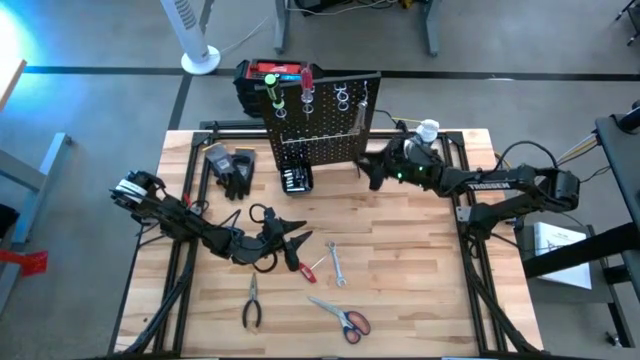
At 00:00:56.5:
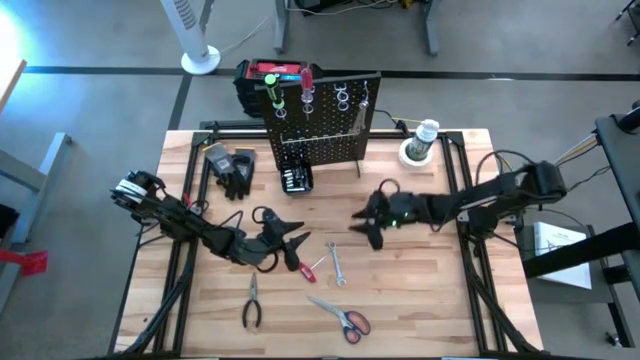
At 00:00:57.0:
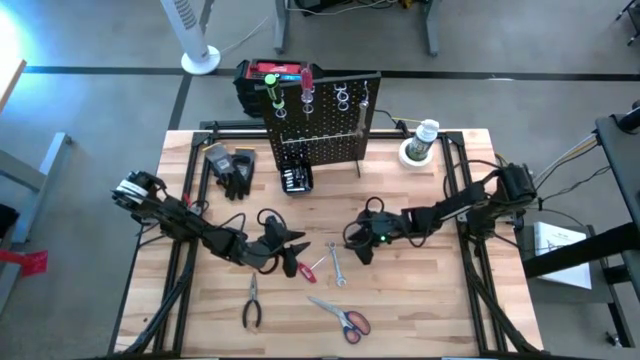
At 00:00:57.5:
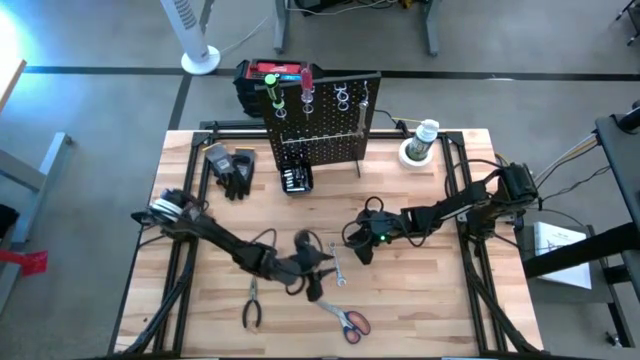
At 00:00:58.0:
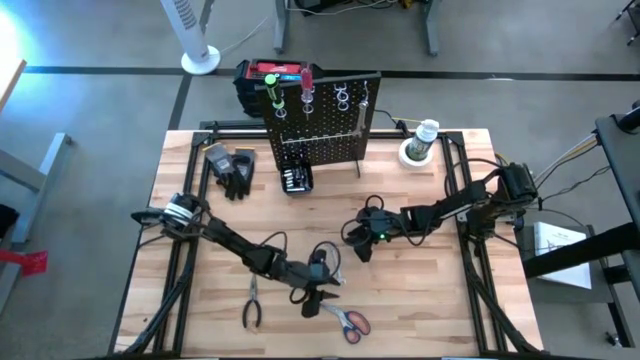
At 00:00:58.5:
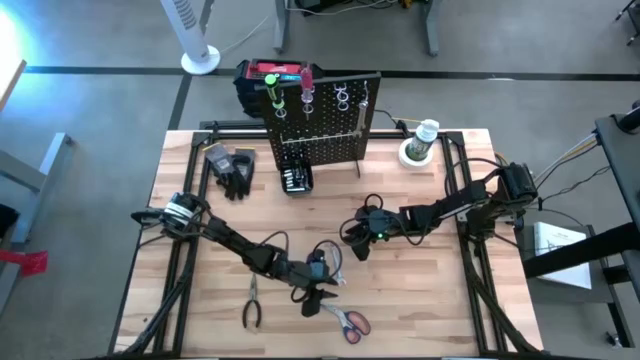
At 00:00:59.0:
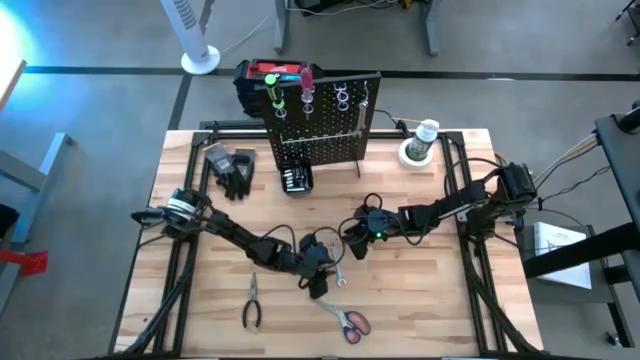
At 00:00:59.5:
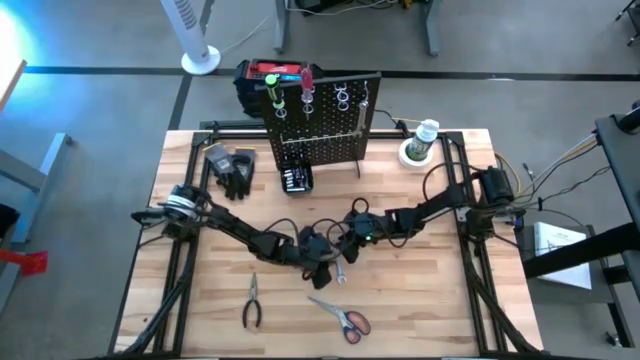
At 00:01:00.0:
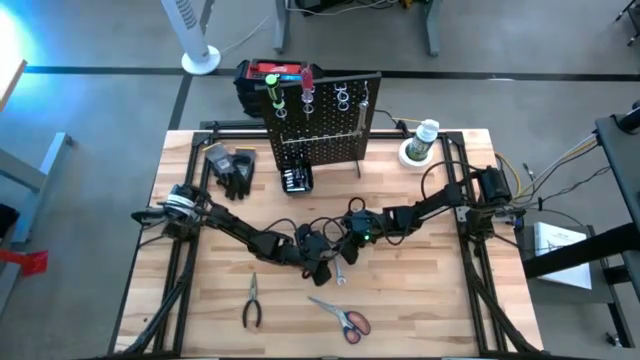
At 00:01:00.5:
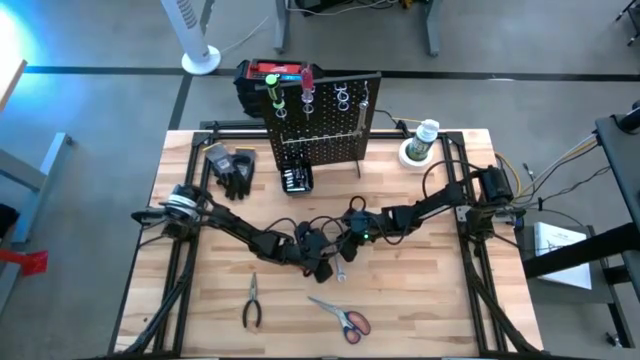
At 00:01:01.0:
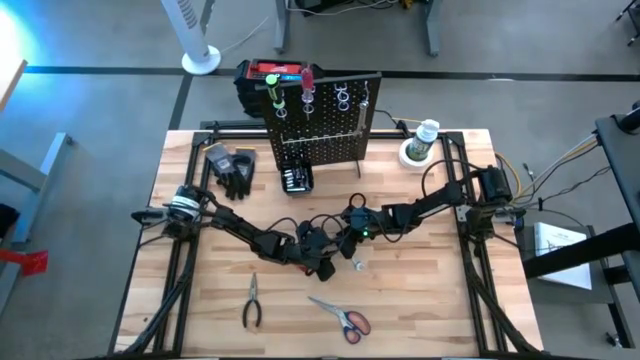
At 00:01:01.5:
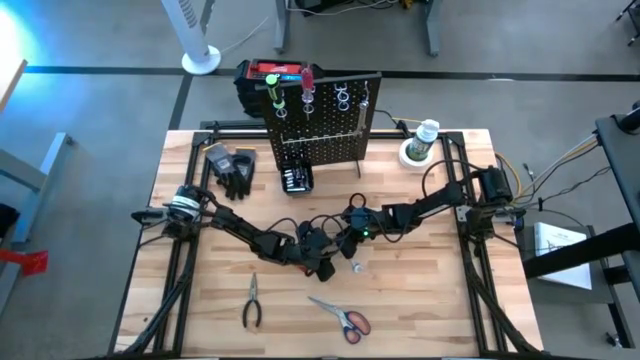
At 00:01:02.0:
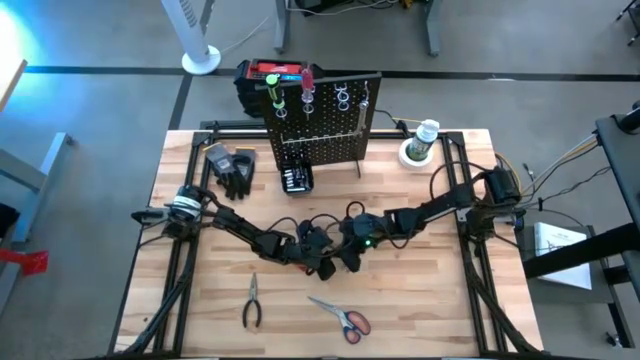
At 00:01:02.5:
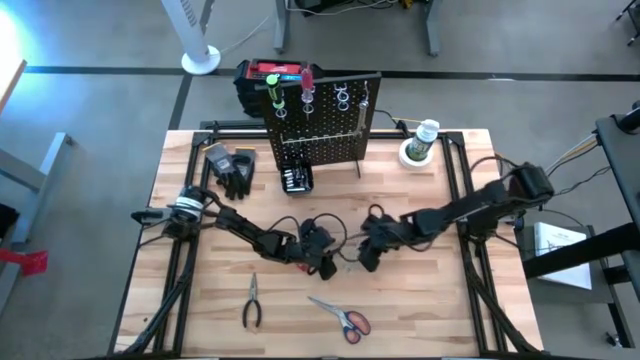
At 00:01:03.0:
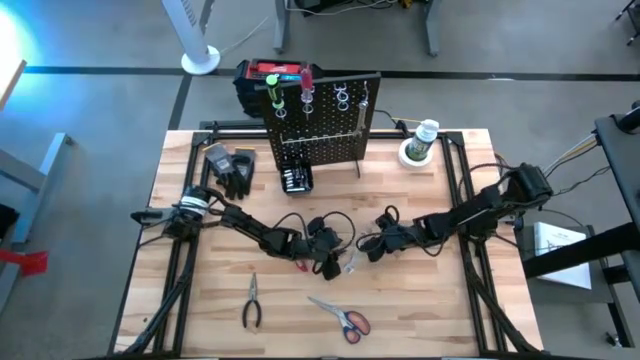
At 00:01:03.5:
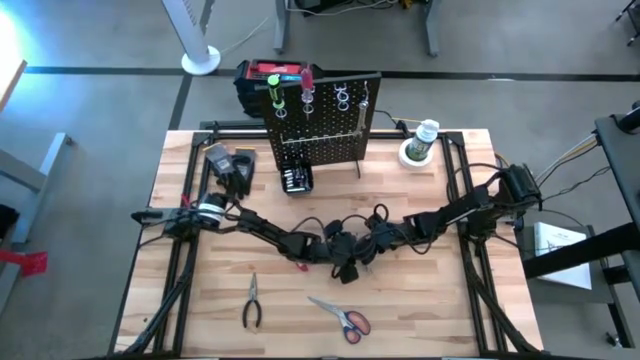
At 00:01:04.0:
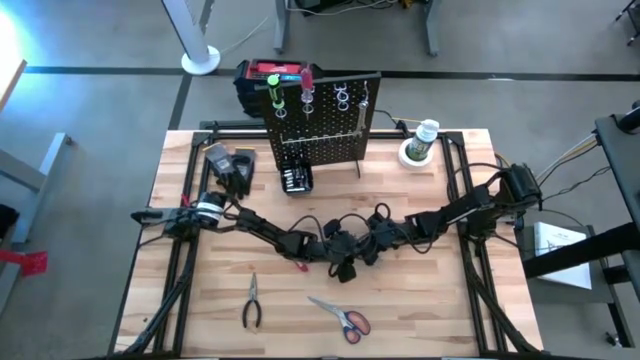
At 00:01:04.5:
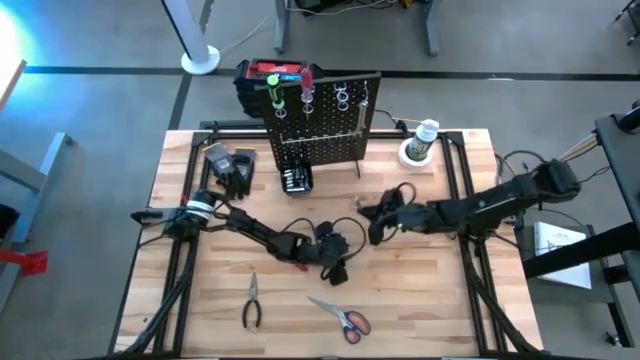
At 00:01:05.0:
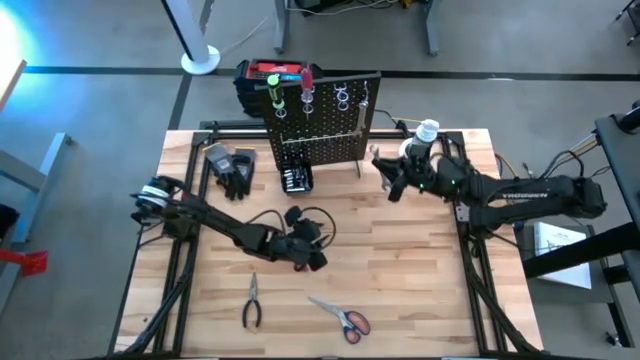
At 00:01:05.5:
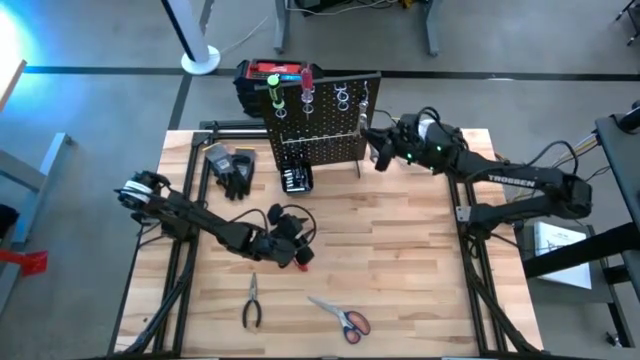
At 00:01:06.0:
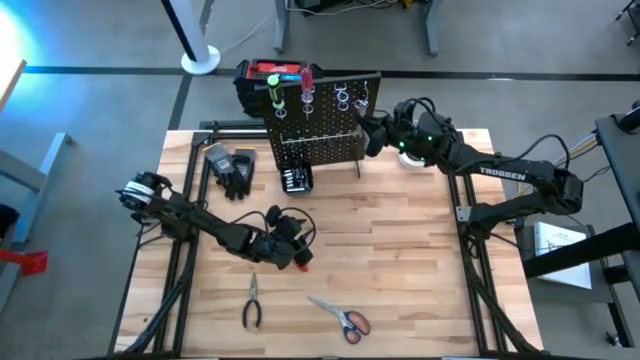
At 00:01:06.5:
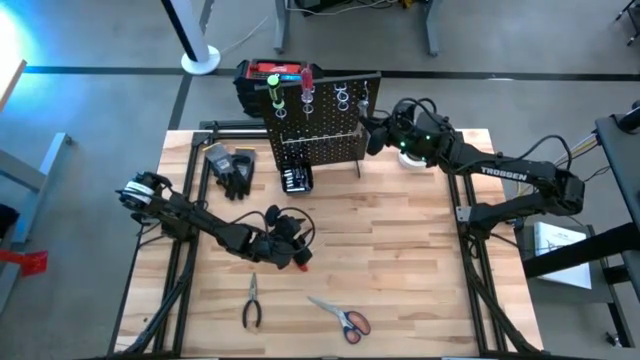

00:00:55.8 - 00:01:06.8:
Task: Hang tools onto peg board
Hang the combination wrench on the pegboard

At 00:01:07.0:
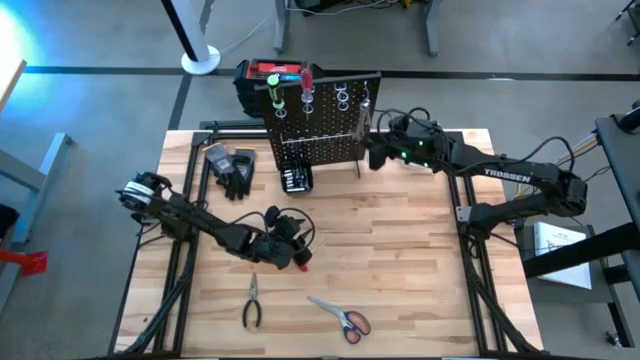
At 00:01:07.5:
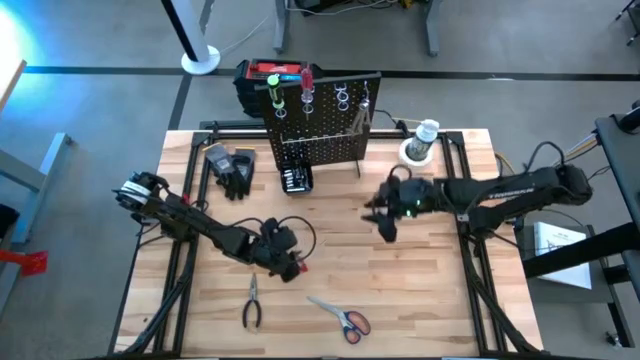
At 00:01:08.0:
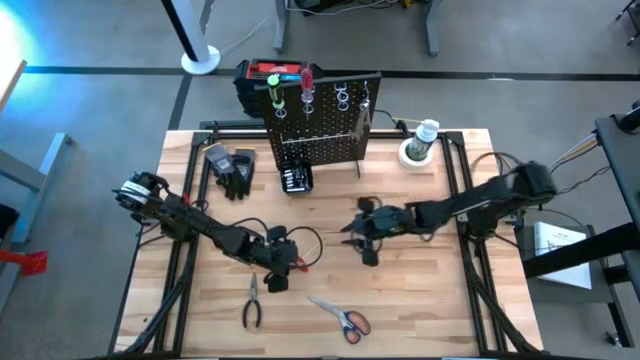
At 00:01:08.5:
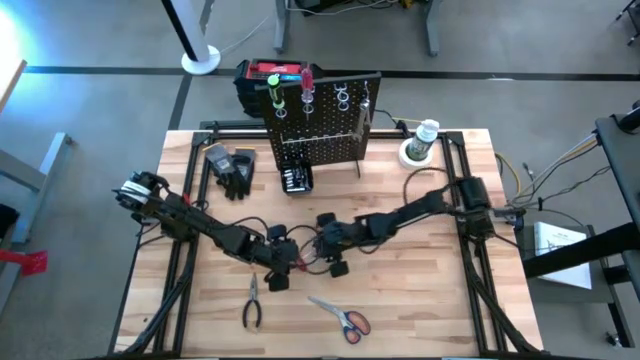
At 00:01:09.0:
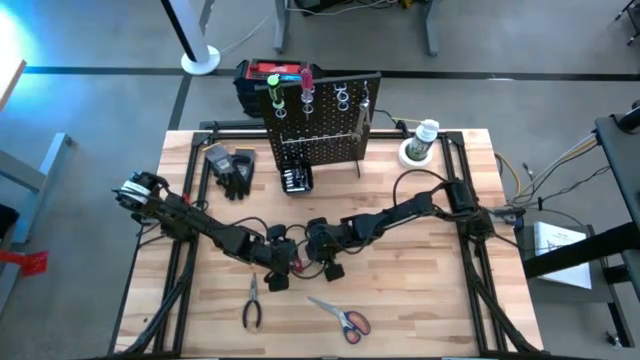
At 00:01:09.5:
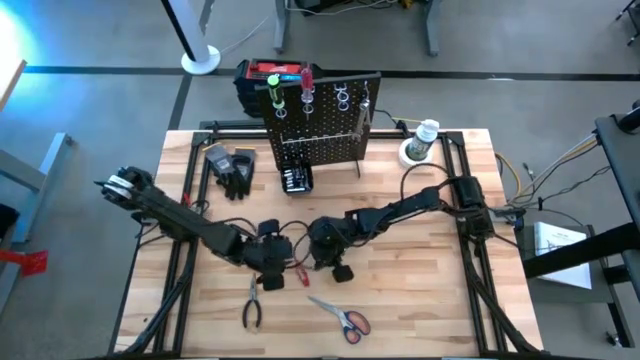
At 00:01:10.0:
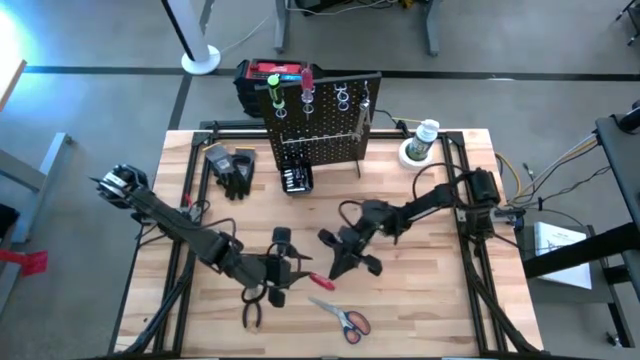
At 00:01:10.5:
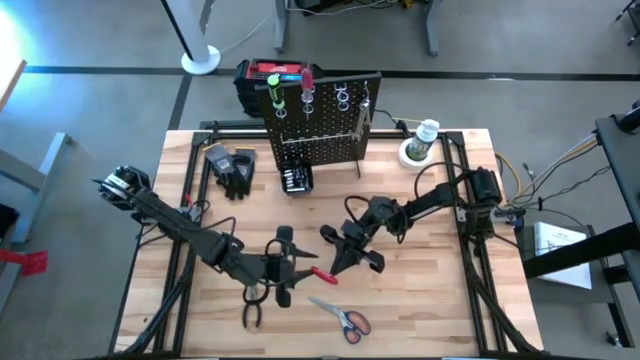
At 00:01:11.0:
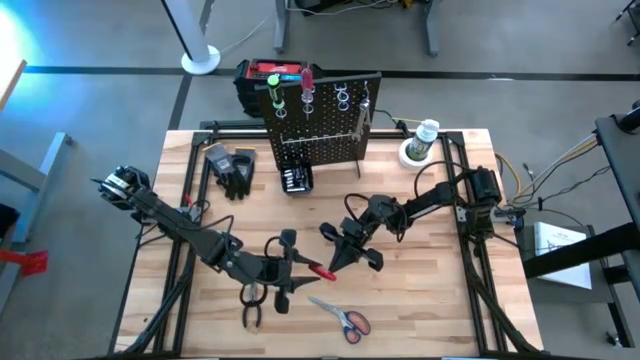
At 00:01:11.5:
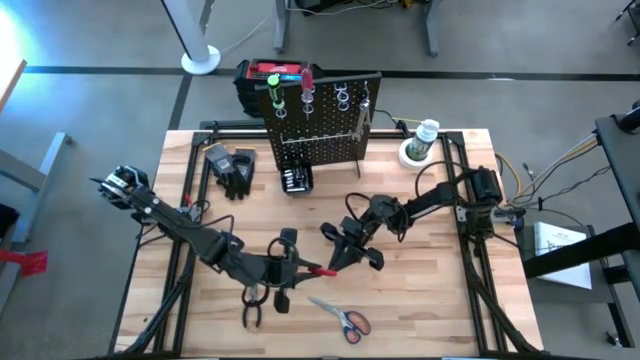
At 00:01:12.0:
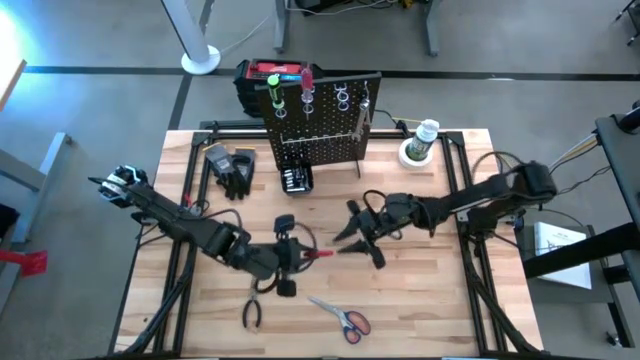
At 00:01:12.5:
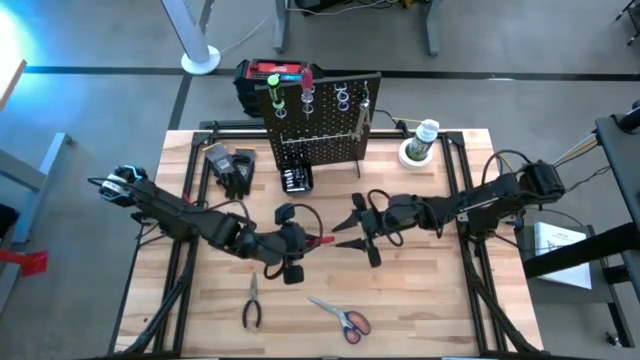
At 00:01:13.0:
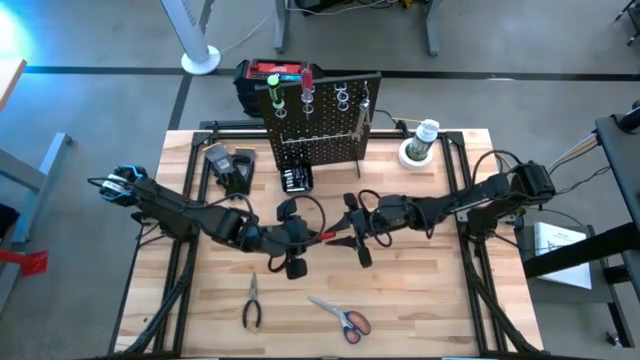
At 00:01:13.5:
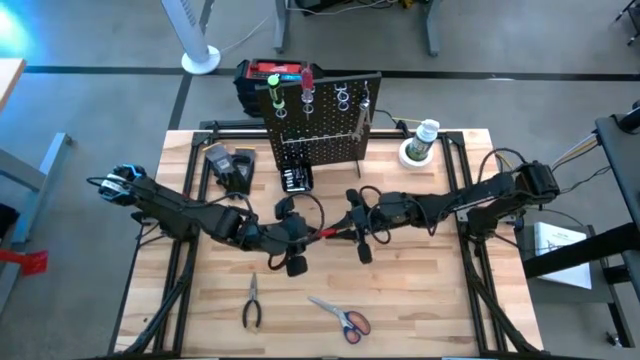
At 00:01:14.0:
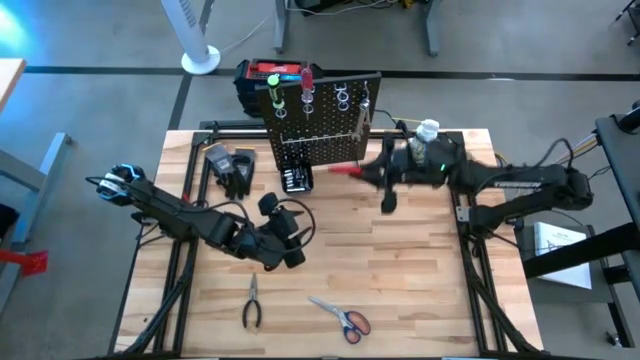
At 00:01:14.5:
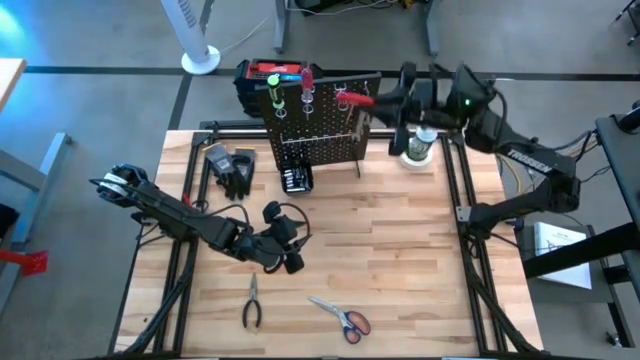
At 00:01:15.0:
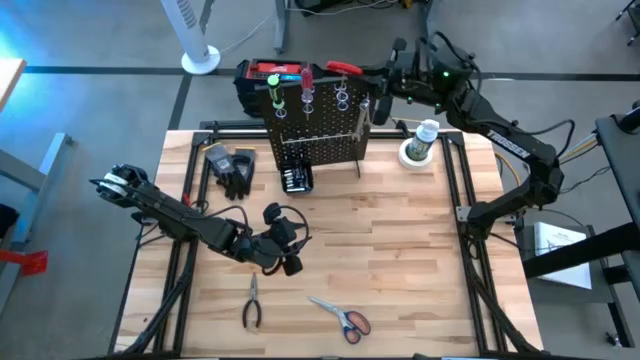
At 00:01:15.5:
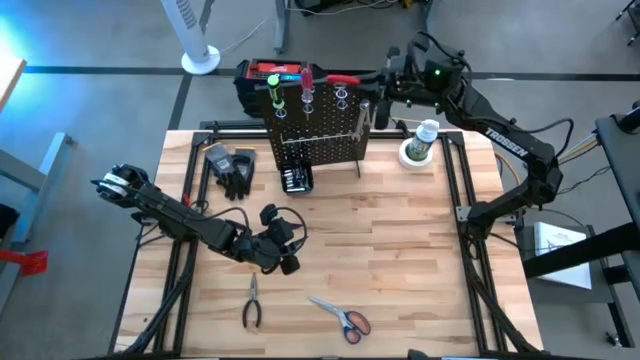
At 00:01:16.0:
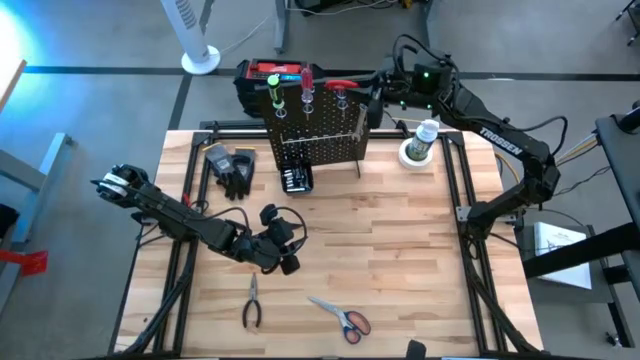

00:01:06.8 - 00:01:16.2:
Hang the red allen wrench on the pegboard
